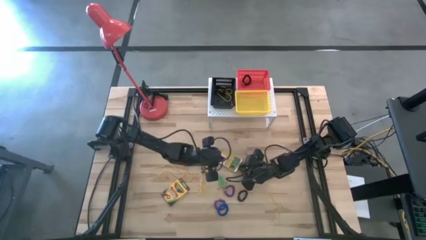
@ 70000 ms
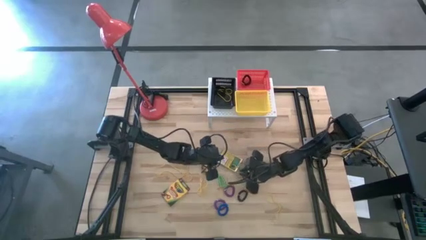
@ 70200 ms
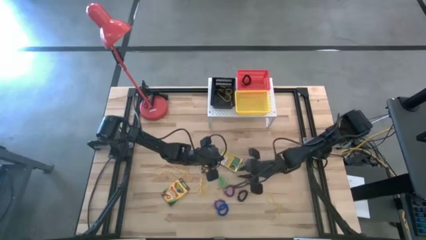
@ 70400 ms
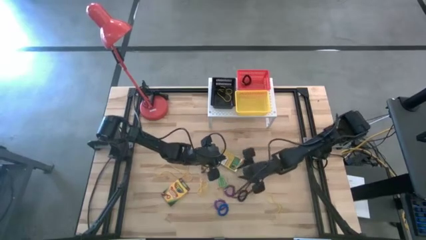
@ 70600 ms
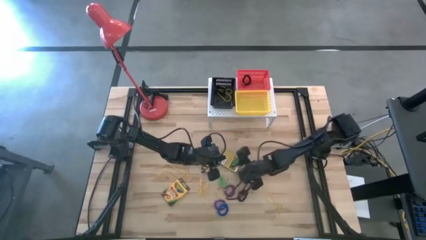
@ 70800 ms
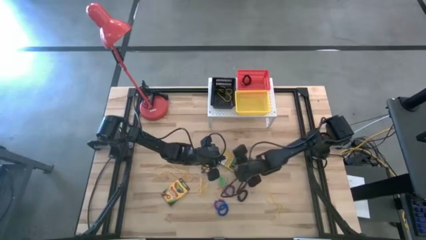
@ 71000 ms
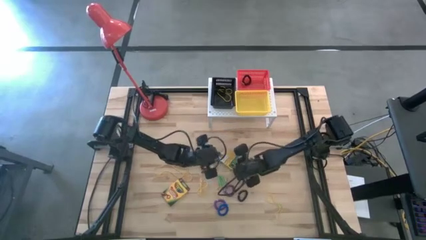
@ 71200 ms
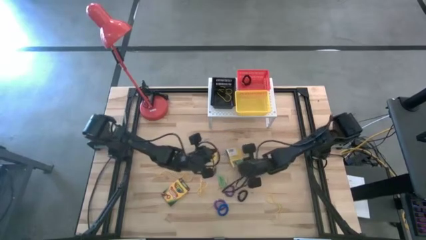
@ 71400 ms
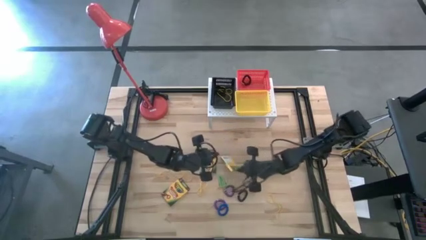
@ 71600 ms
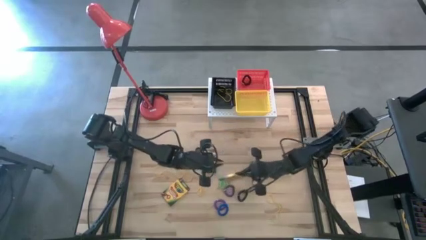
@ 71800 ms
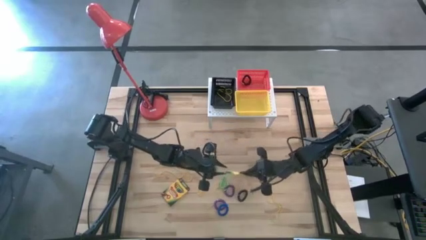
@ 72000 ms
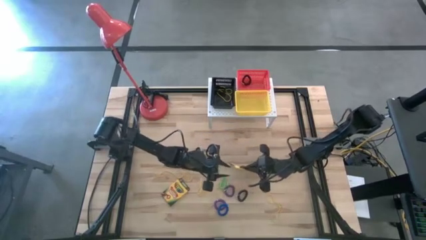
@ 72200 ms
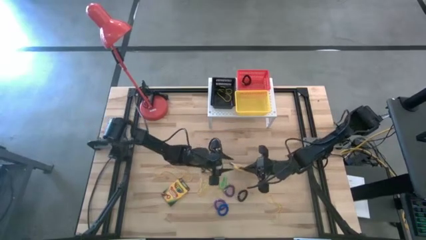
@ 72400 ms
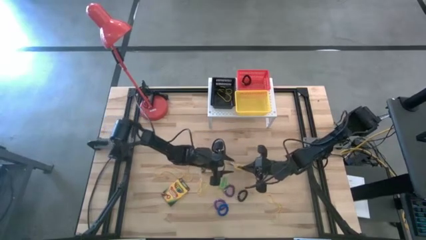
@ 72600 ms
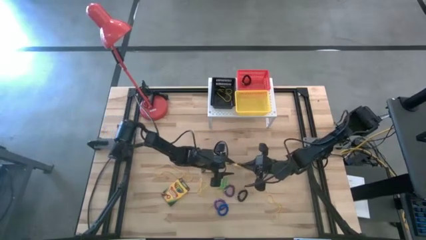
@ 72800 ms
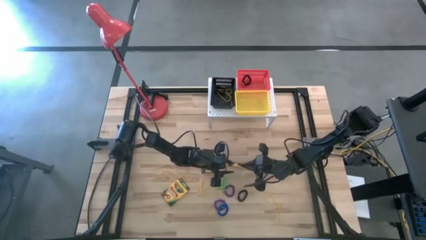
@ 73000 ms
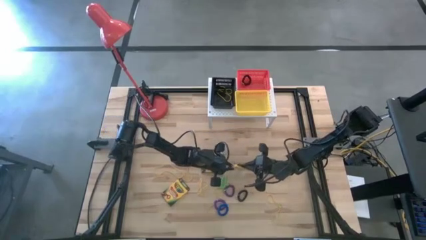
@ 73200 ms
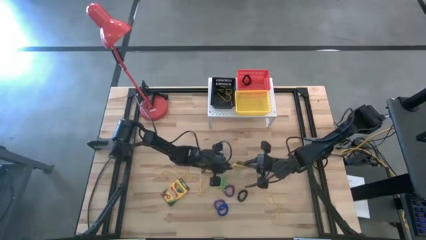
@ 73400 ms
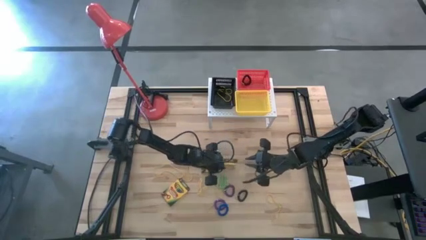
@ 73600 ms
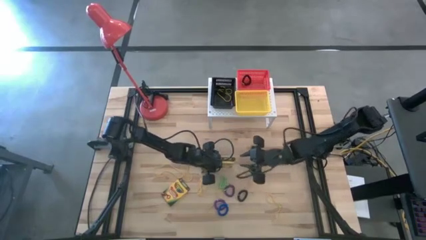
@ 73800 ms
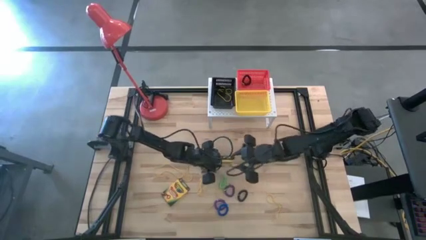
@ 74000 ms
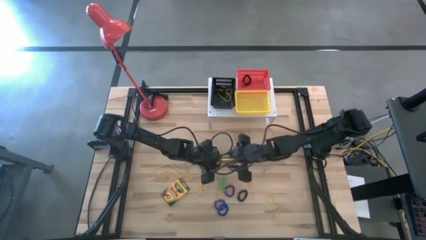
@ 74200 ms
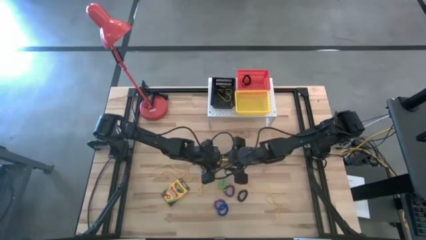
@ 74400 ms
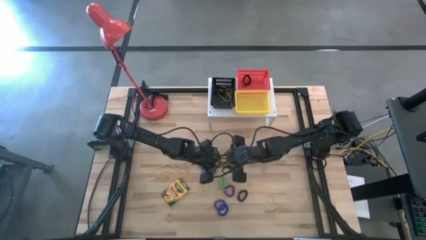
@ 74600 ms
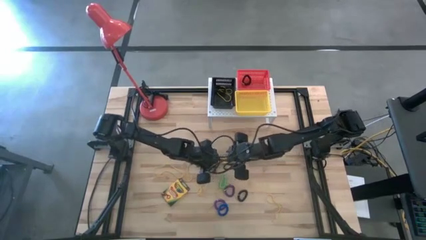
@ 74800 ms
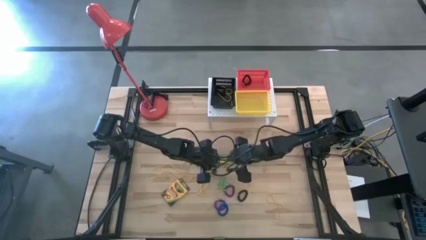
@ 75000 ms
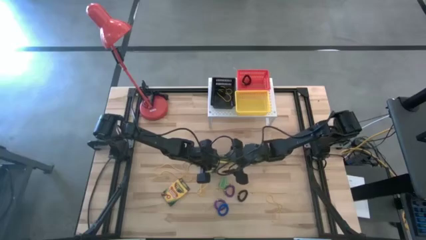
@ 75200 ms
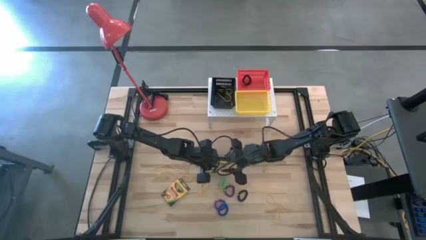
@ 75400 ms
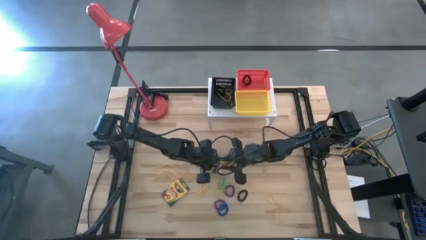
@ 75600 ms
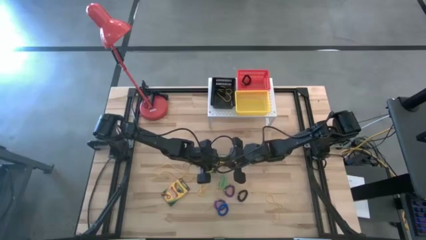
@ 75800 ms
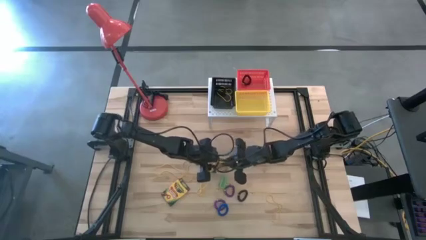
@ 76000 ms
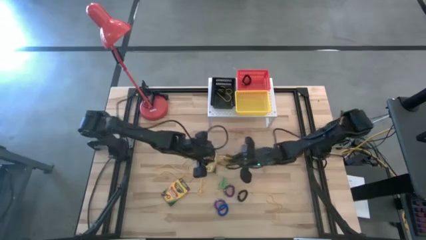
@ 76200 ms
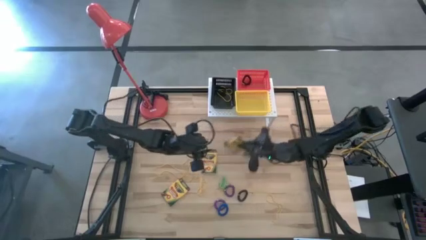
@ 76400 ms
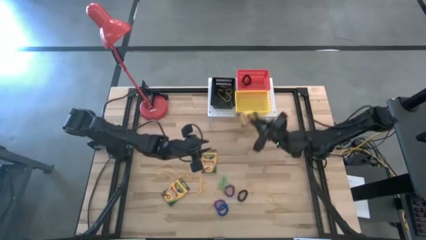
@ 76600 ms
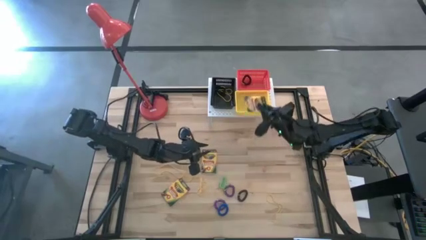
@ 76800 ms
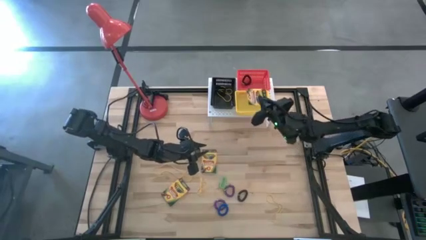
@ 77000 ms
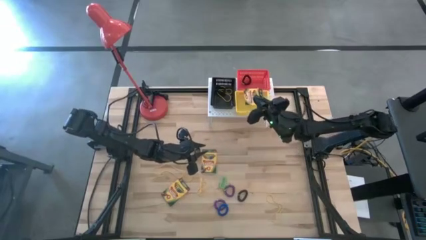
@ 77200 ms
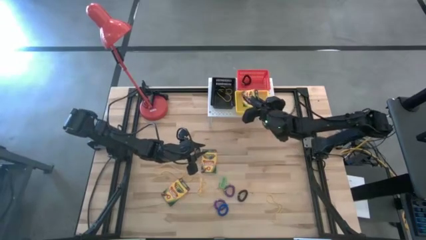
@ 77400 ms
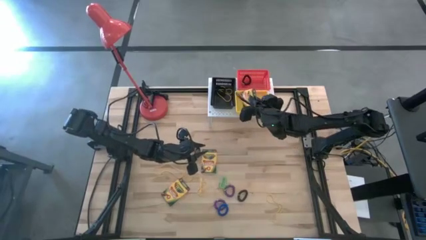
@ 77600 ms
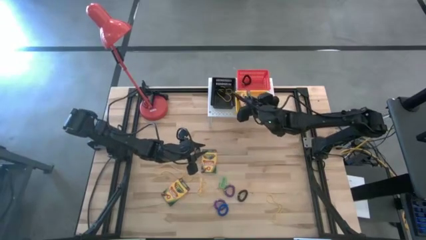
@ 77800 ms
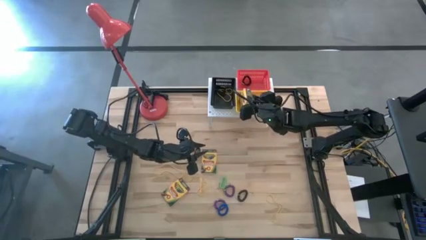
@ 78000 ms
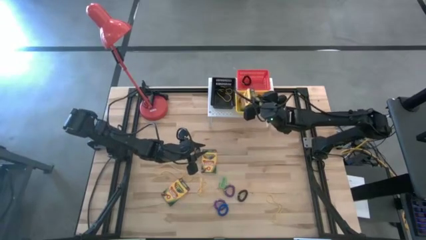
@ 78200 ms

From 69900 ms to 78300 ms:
Task: Pick & Place Office Desk Supplies
Put the yellow crayon box into the yellow bin on the shelf

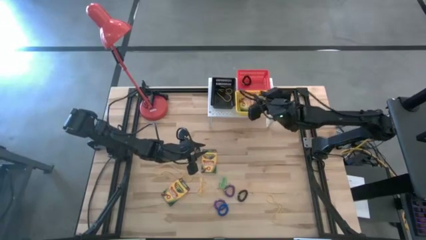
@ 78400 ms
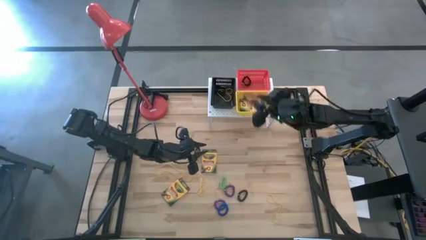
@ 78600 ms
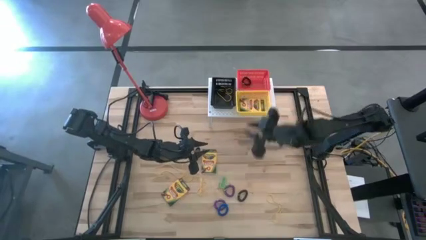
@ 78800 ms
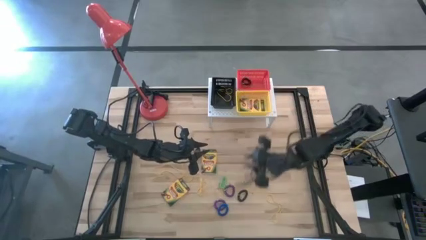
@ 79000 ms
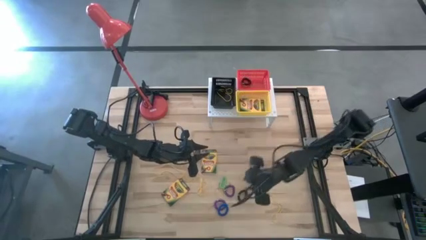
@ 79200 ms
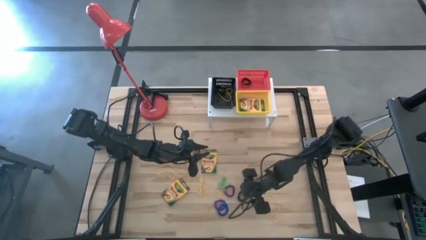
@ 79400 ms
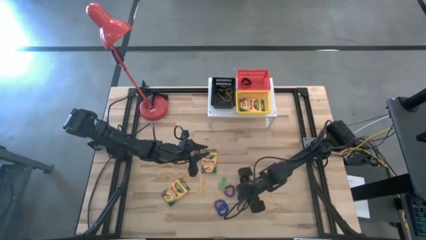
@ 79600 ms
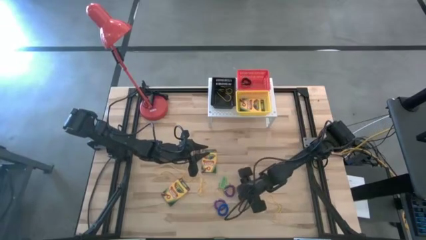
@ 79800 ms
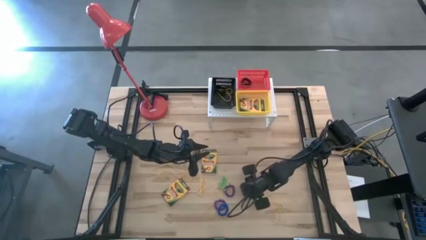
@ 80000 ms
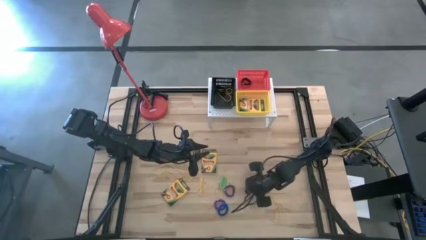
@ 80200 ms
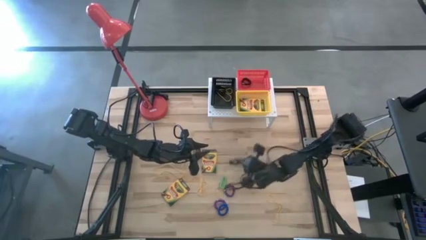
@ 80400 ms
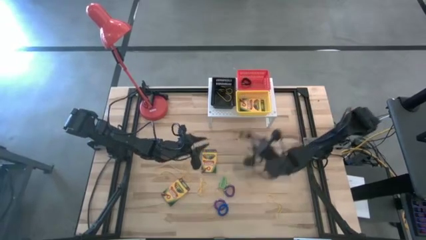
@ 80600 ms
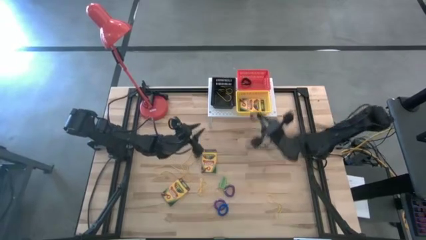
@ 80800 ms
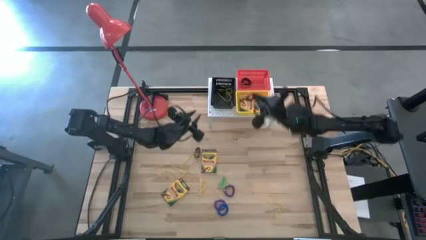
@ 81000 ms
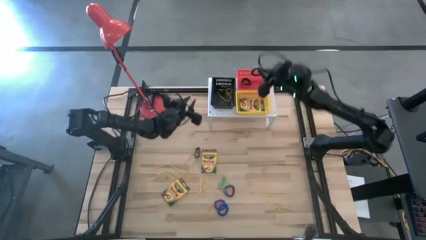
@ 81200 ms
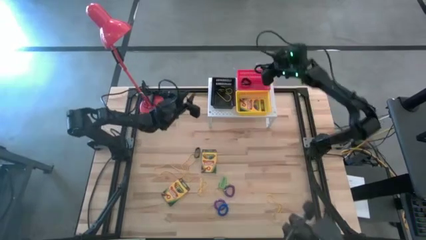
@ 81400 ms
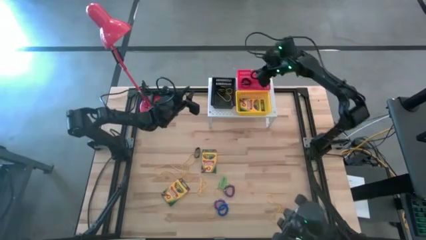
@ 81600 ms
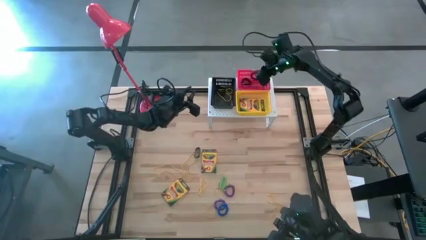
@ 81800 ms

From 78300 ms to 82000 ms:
Put the black spring keychain into the red bin on the shelf

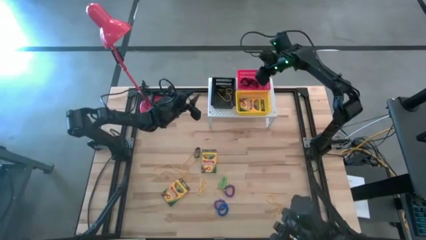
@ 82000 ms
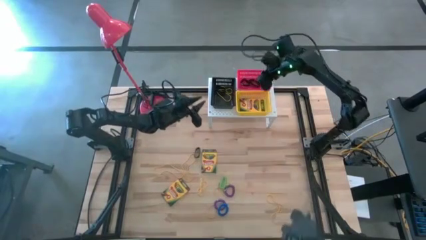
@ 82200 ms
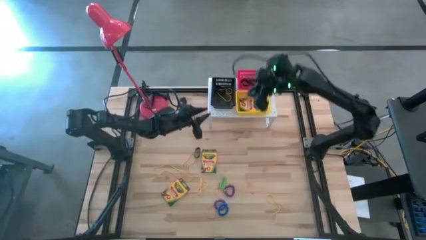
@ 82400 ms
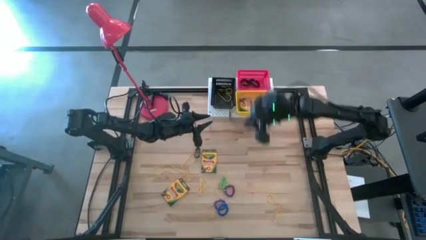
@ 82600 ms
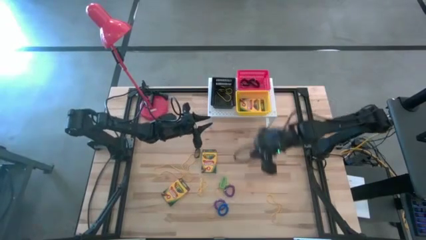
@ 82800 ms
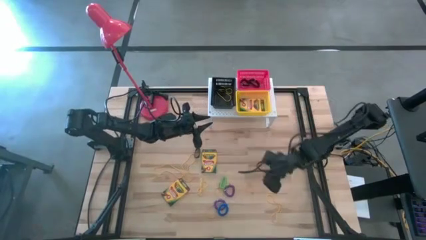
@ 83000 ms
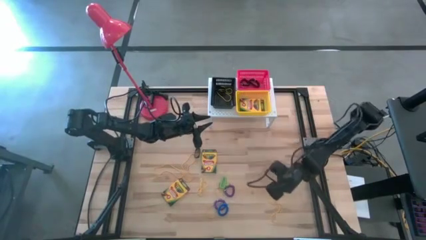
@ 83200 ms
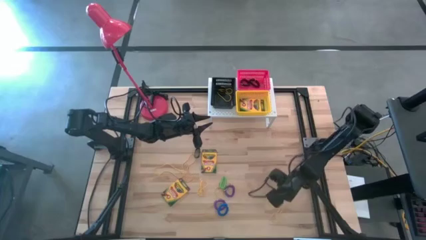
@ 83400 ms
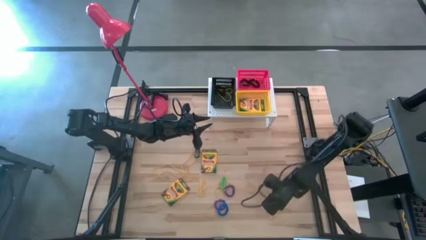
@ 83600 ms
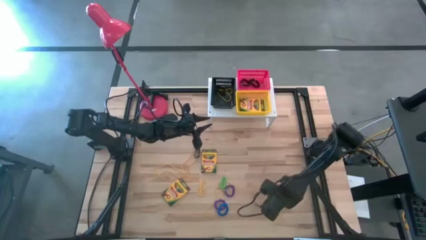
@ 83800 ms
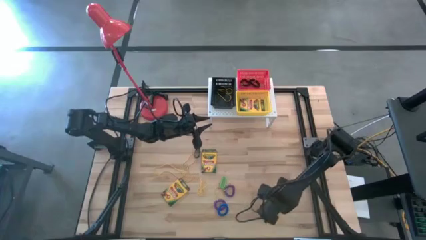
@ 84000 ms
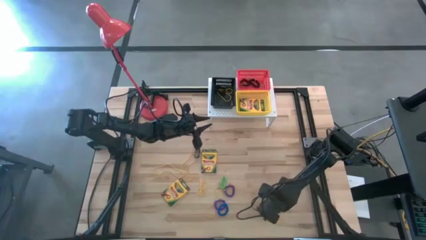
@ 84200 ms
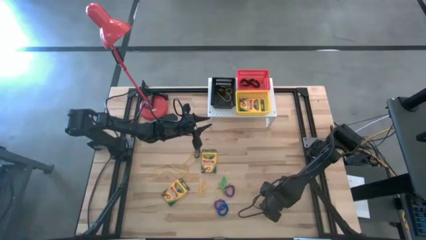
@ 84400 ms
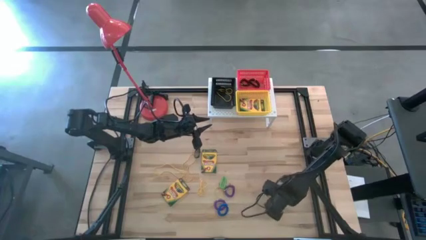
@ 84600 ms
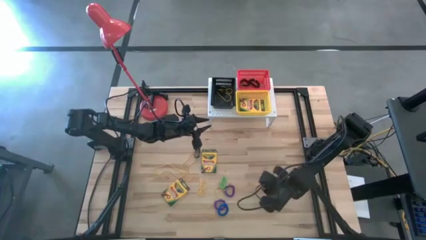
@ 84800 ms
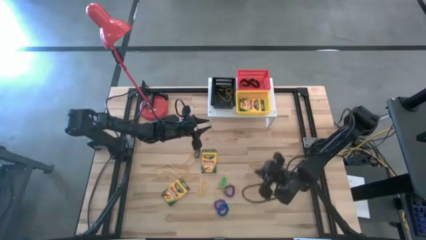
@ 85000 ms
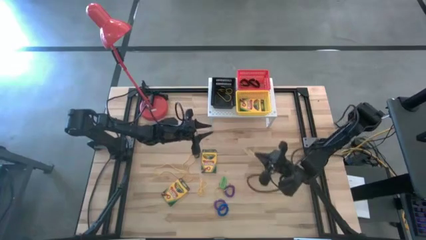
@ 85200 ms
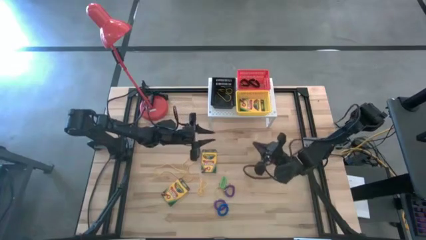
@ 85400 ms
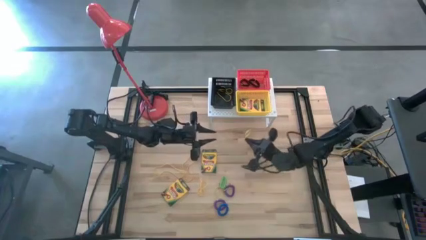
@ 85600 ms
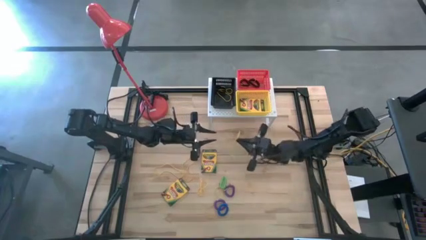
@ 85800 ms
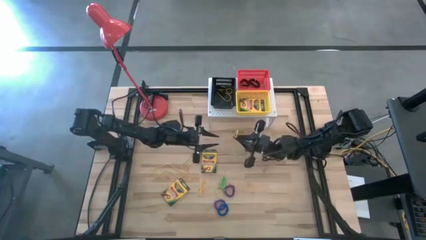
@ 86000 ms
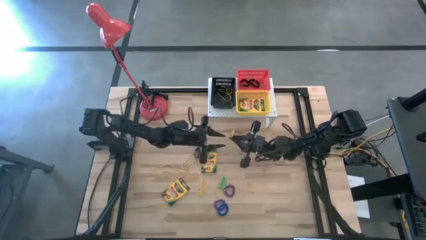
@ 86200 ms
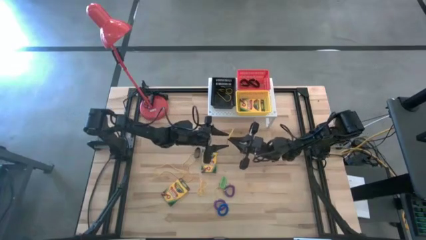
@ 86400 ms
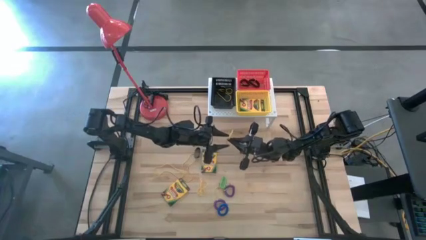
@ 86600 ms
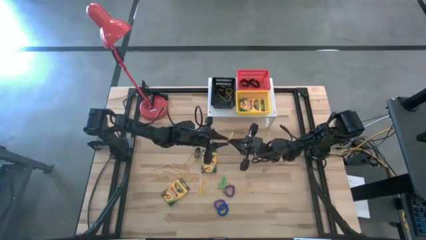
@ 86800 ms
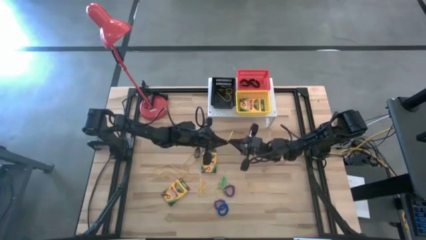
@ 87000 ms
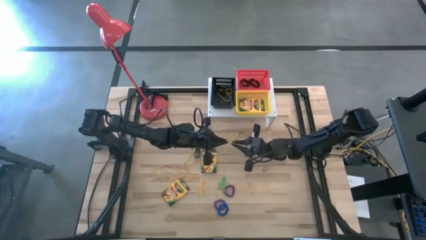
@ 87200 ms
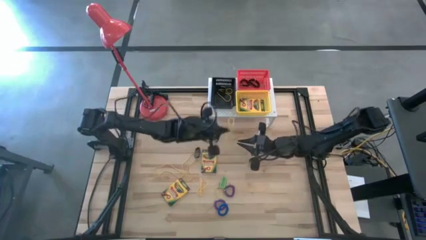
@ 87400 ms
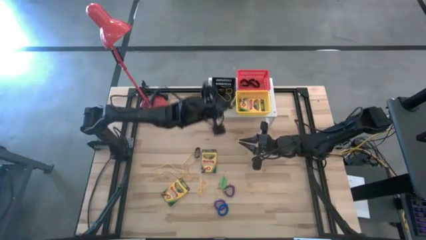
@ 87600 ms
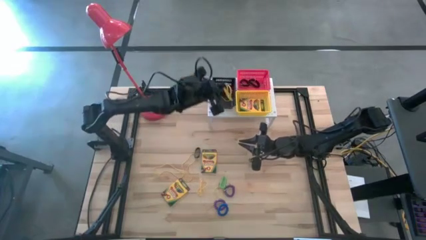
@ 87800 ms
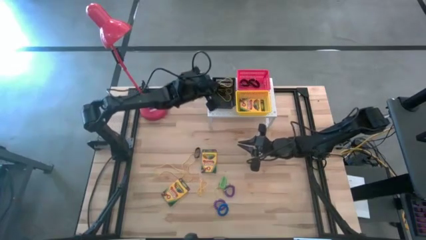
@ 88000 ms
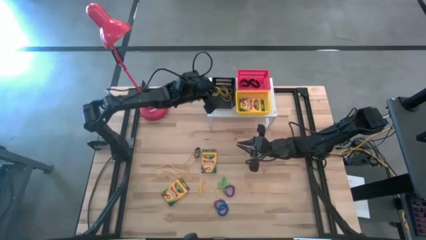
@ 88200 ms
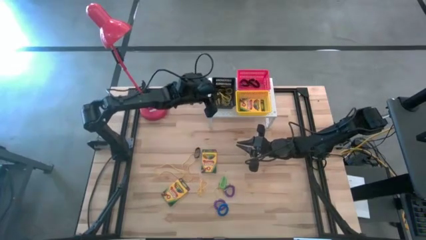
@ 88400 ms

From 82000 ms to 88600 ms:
Put the yellow rubber band into the black bin on the shelf
